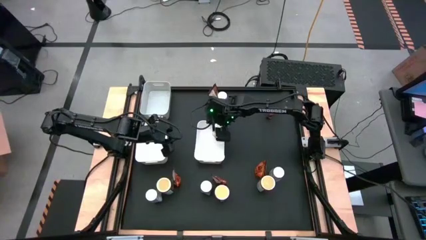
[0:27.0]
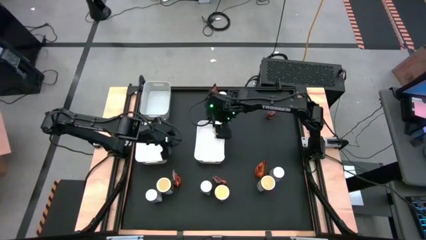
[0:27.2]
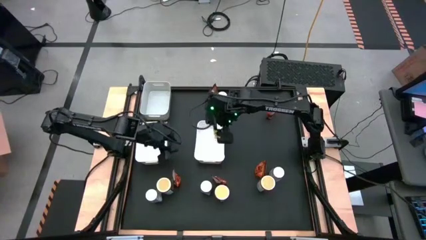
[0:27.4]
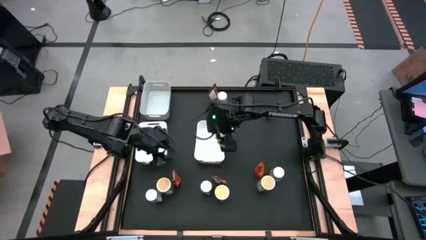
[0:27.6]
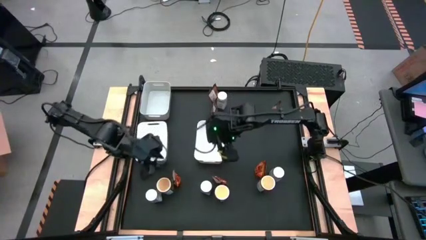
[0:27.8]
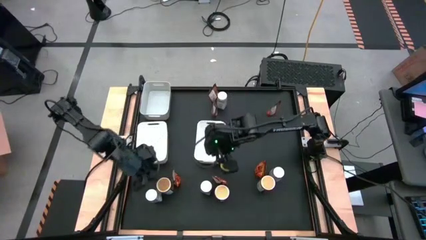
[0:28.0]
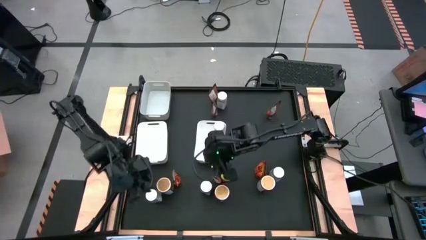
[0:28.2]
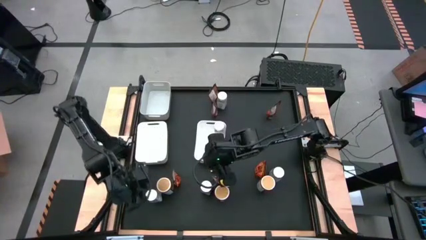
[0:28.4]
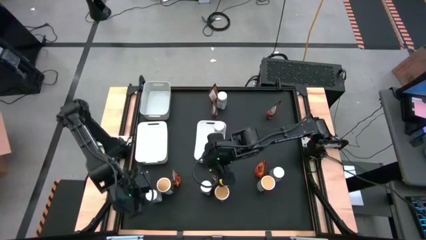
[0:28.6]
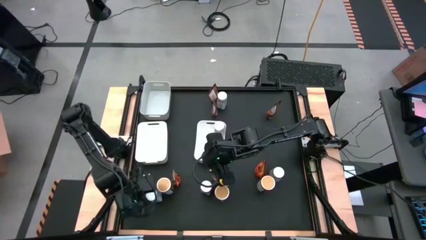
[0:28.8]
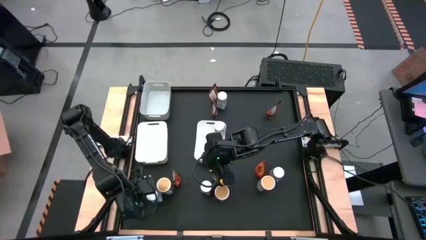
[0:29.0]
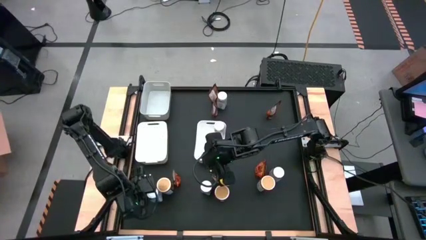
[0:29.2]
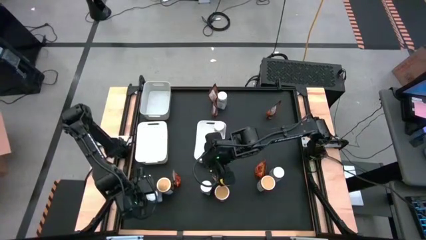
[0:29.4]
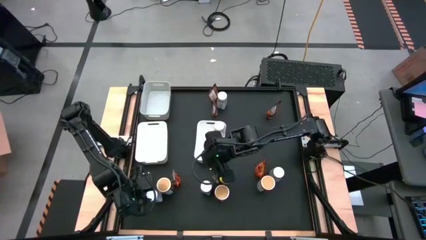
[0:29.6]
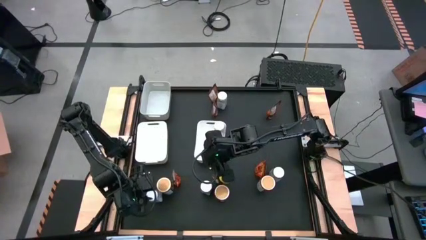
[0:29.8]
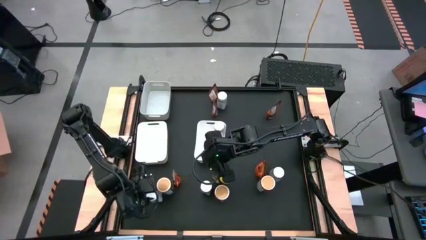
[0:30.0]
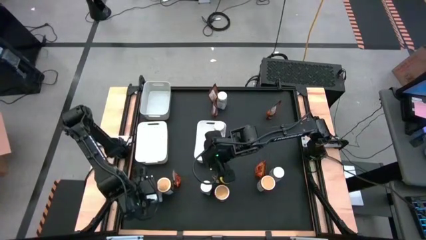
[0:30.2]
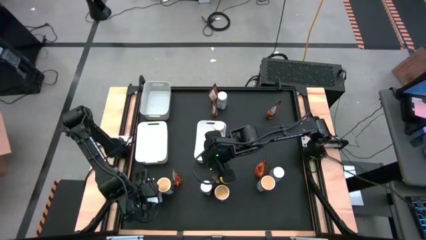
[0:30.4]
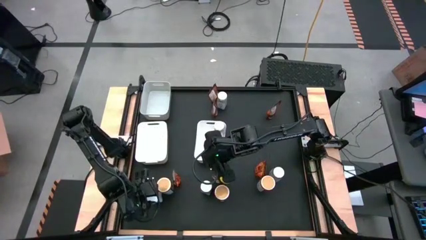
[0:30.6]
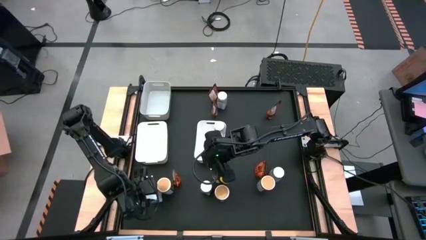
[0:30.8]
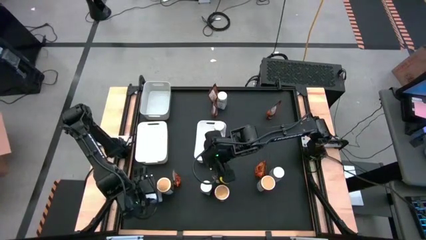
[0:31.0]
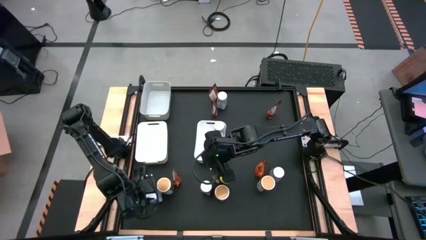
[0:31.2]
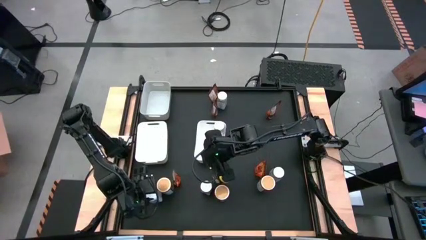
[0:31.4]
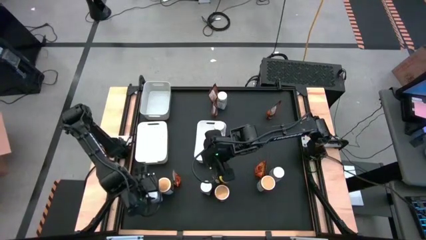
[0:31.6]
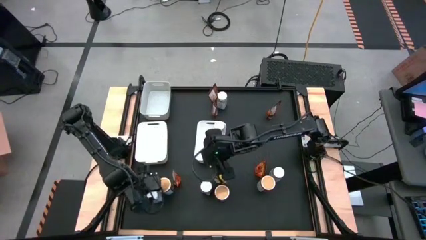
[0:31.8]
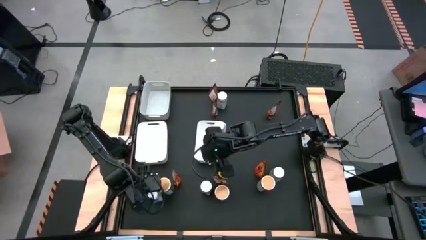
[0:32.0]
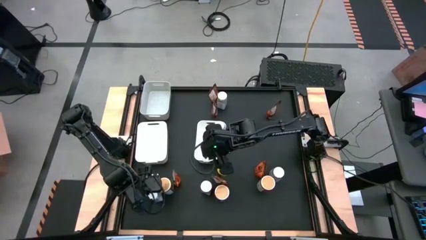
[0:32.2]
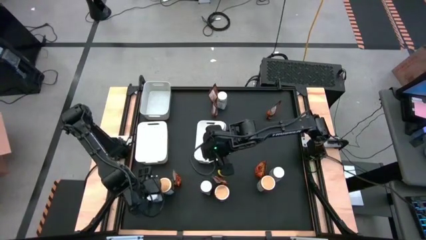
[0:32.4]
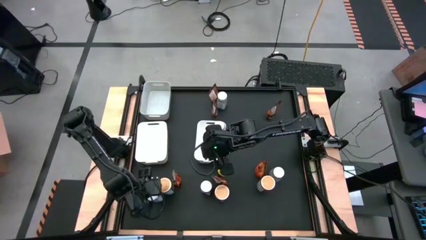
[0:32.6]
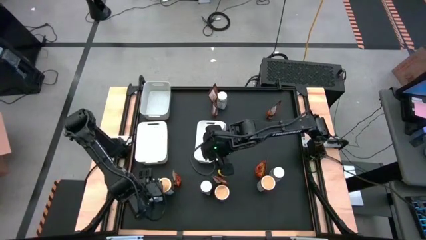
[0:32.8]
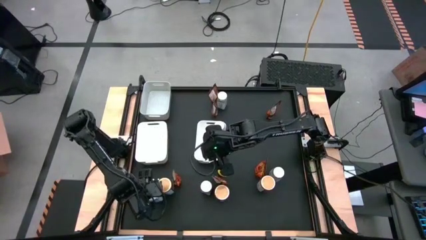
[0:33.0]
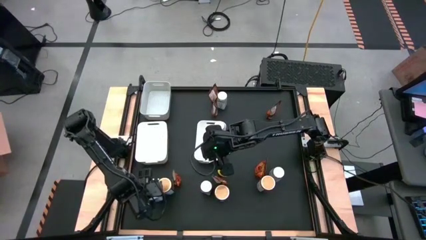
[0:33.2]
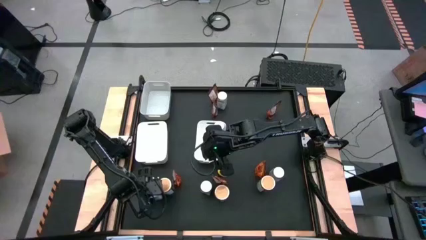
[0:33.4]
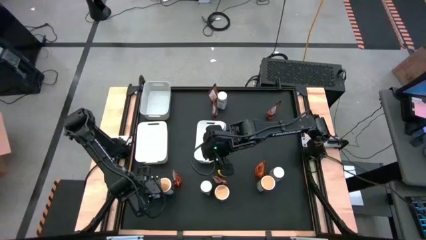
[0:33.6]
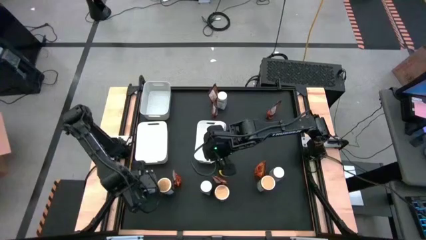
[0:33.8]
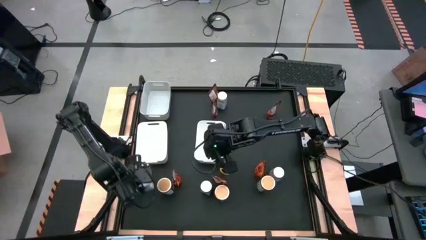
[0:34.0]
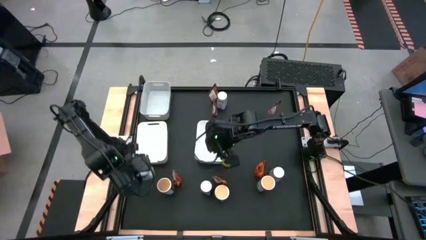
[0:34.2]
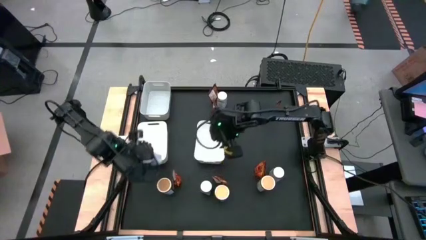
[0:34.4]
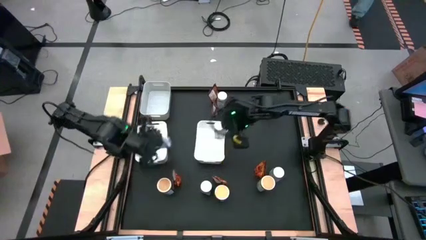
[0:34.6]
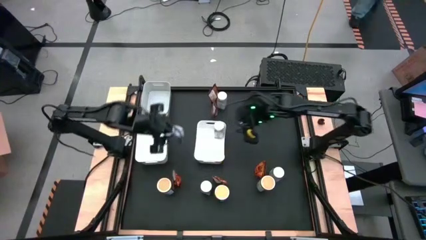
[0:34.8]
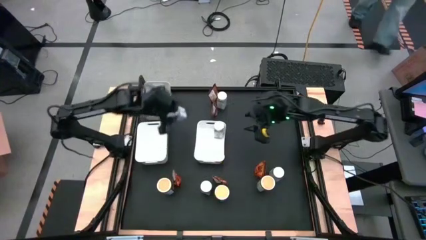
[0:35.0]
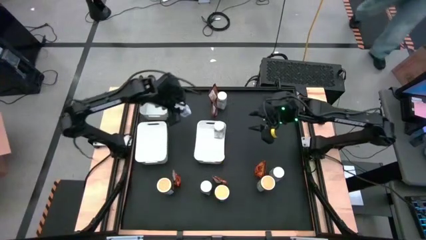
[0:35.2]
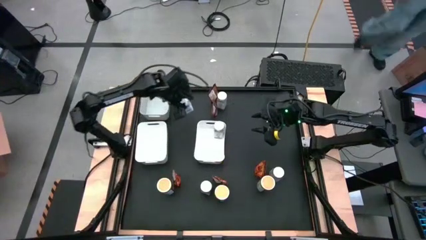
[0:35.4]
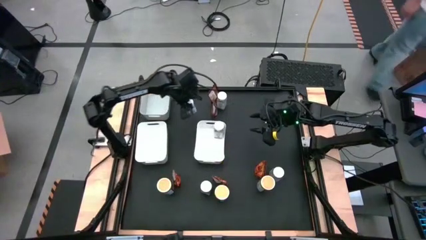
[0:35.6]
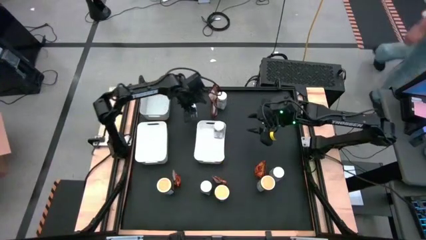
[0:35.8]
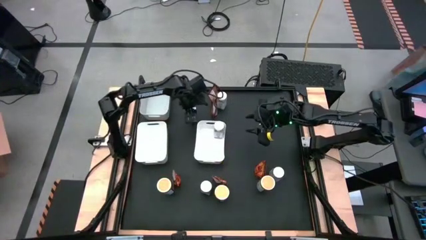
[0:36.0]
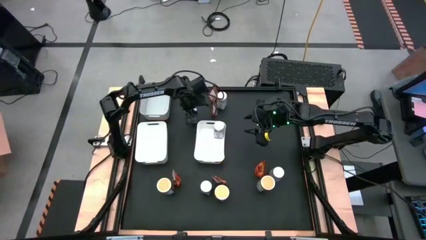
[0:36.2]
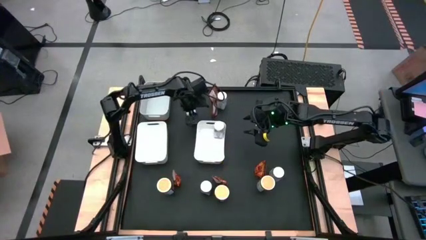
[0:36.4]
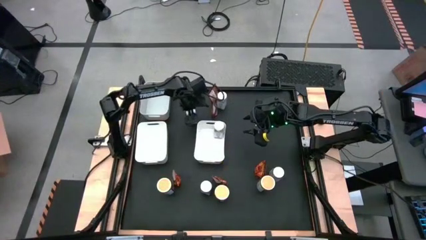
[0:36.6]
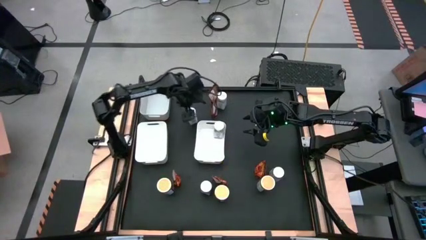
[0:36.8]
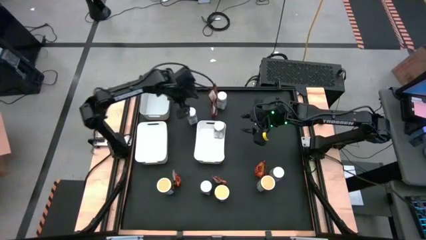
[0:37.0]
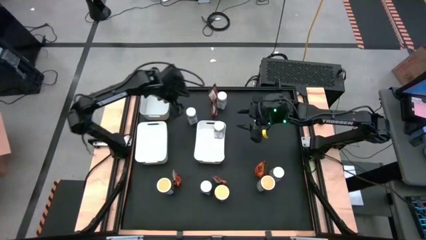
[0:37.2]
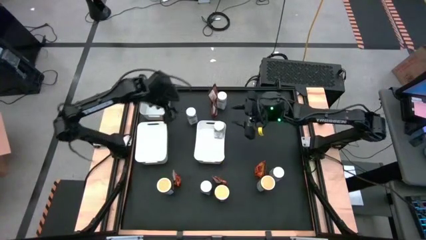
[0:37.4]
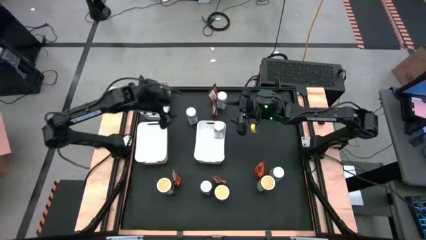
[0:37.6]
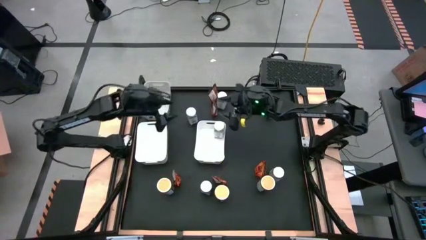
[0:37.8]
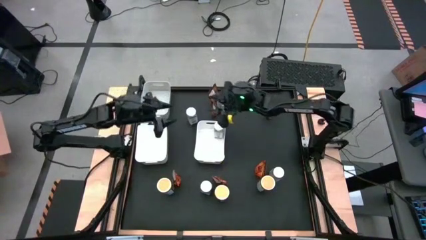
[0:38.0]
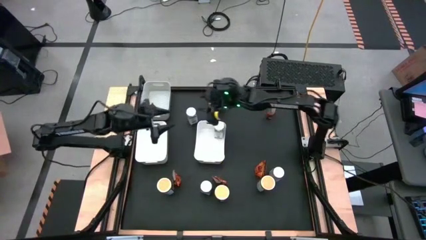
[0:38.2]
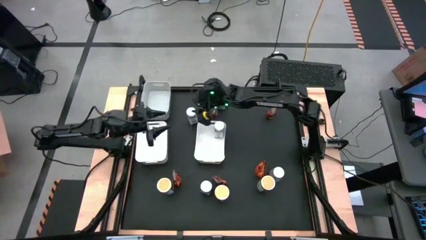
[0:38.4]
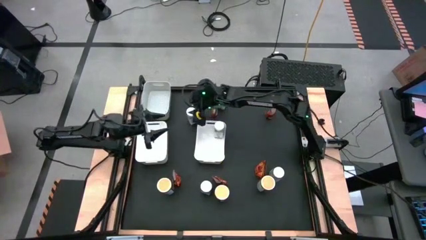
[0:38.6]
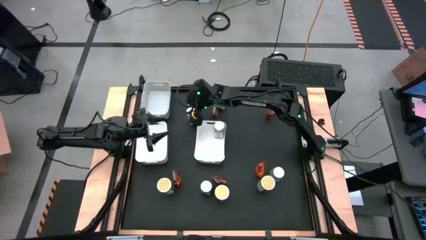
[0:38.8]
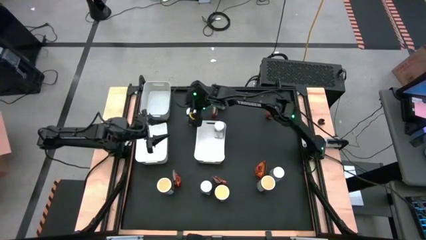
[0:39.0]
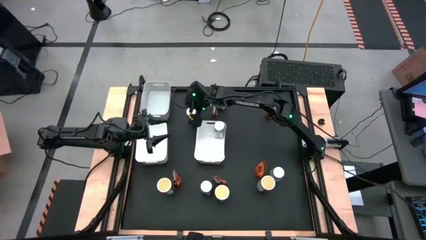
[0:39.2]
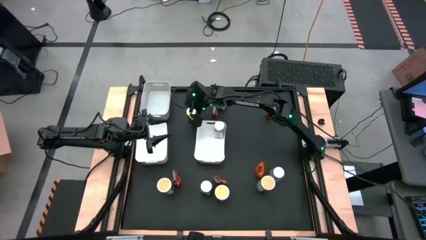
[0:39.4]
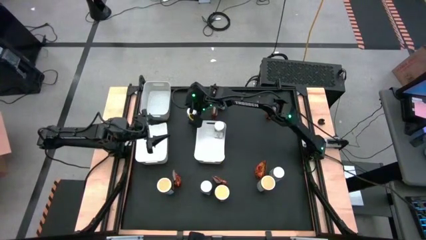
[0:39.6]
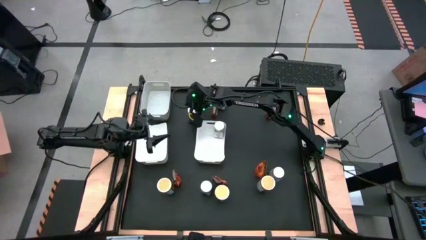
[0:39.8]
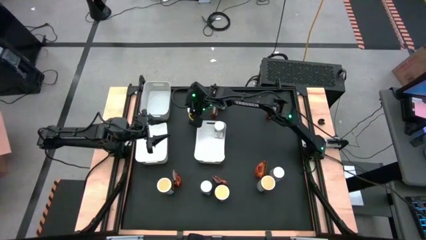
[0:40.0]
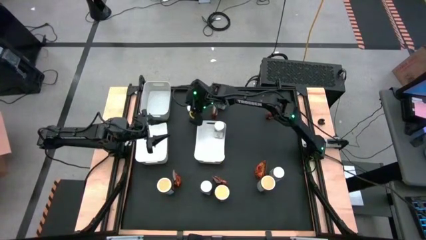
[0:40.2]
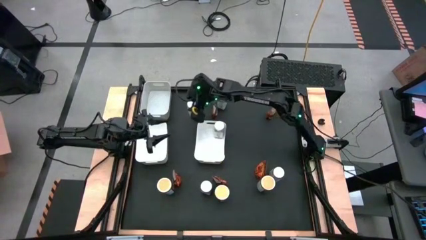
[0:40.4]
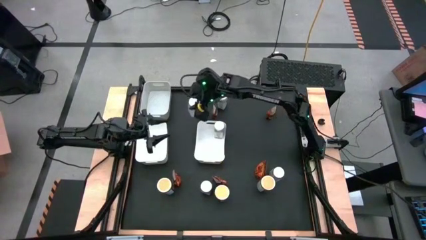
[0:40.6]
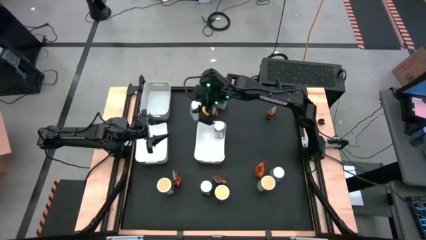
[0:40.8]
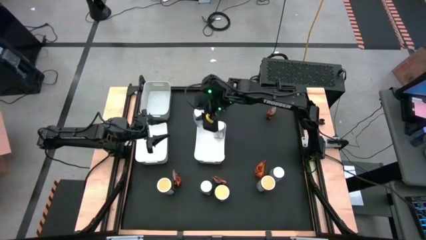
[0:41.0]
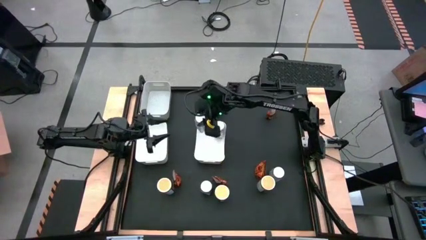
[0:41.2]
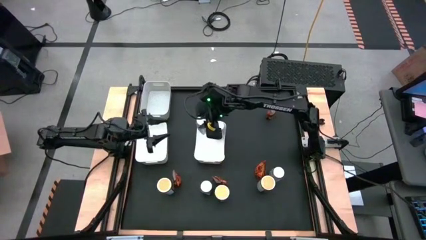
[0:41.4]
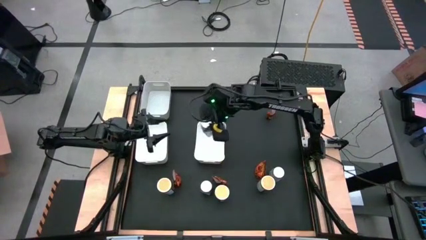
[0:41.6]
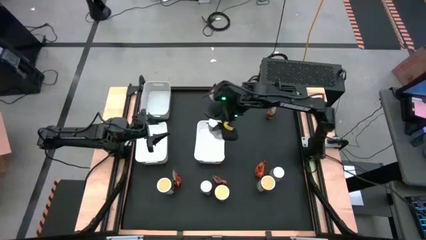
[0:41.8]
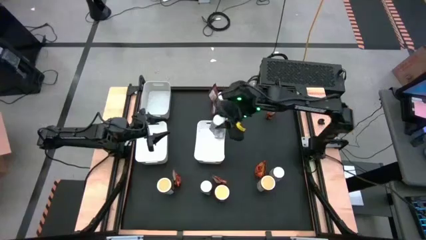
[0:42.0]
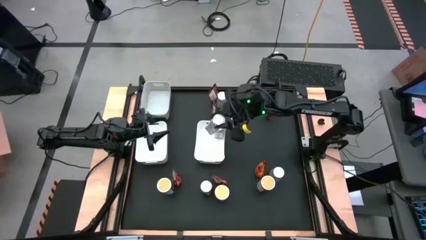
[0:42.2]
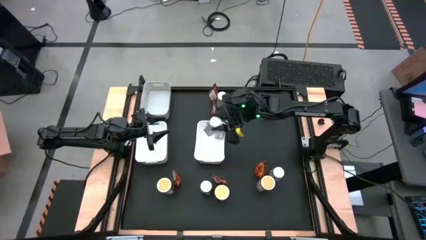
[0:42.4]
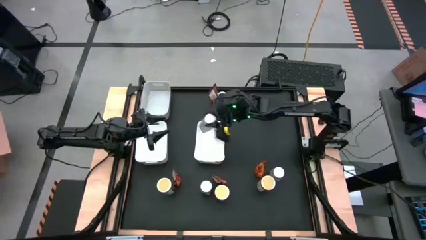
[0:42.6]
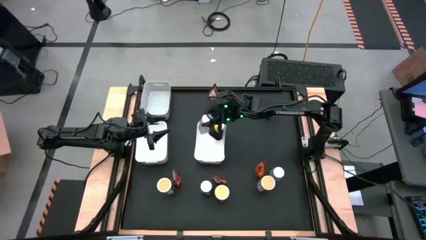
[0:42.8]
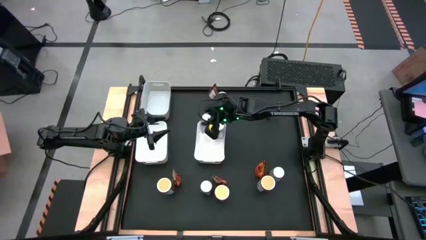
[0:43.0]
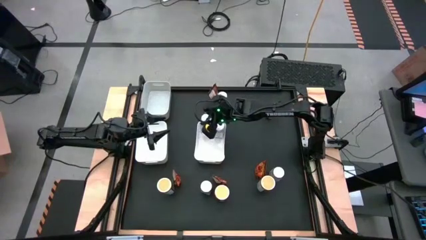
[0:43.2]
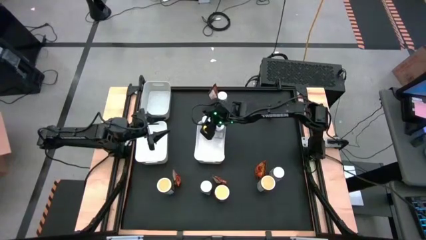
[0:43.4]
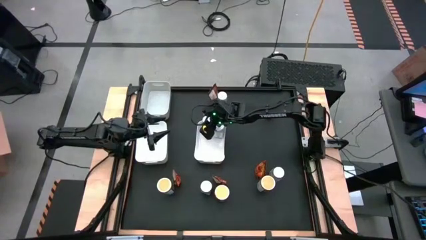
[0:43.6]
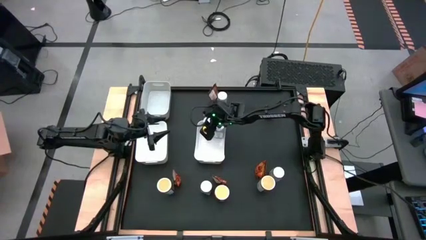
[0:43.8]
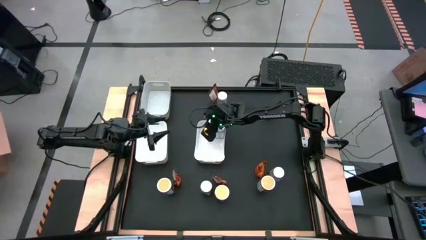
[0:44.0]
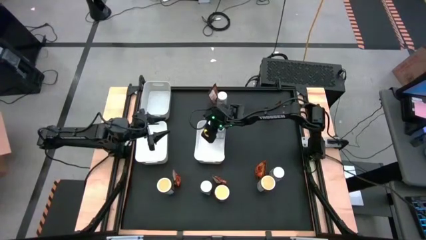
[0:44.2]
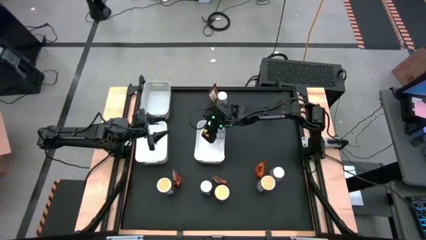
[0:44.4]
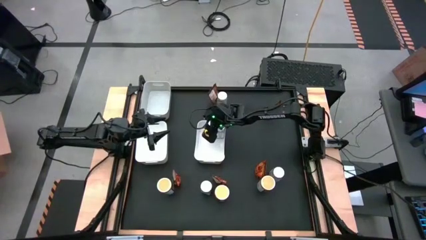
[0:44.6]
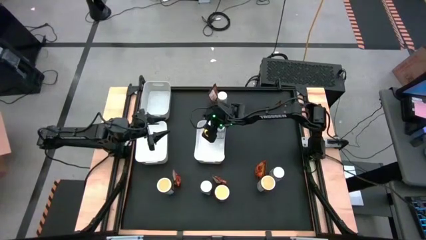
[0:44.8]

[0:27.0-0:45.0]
Task: Sort spices by type
Put the white seasoning bottle into the right white bin
